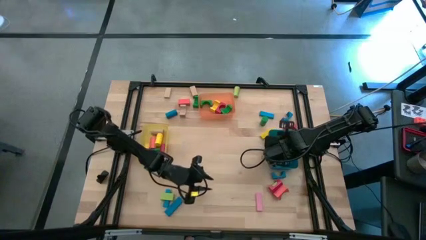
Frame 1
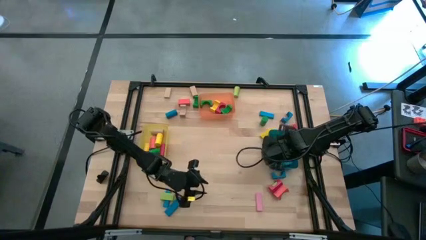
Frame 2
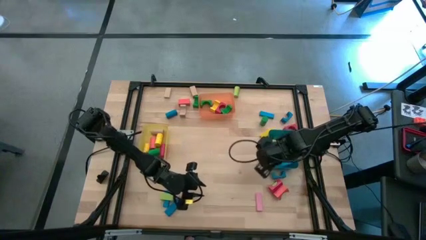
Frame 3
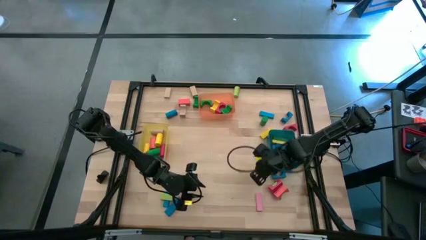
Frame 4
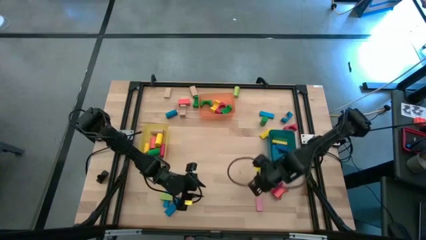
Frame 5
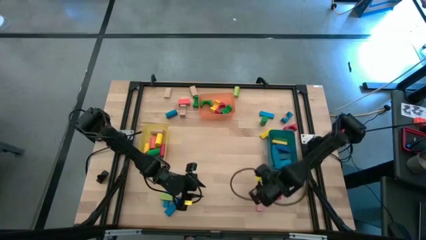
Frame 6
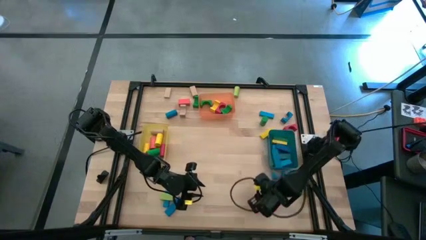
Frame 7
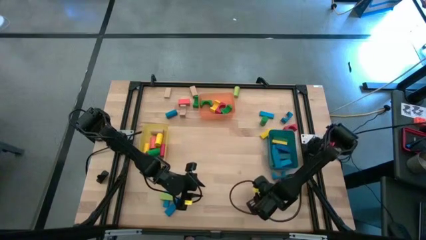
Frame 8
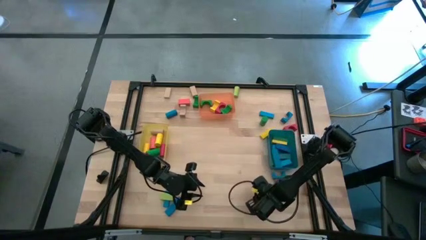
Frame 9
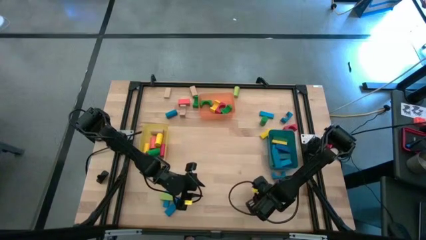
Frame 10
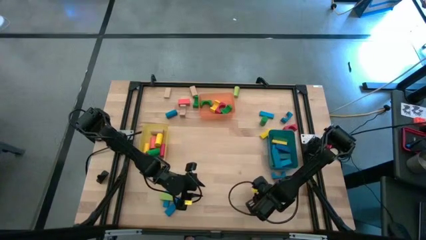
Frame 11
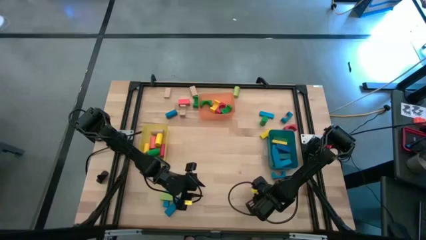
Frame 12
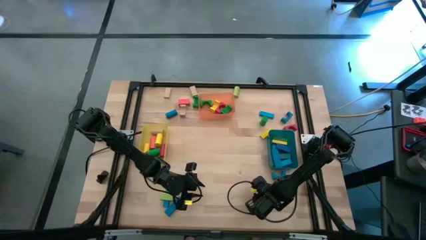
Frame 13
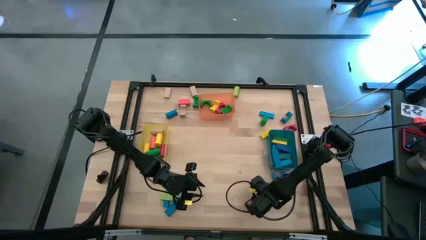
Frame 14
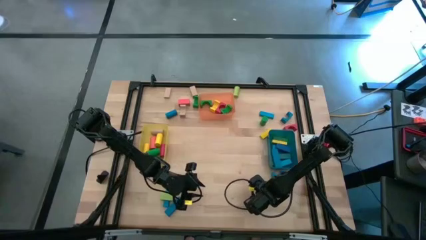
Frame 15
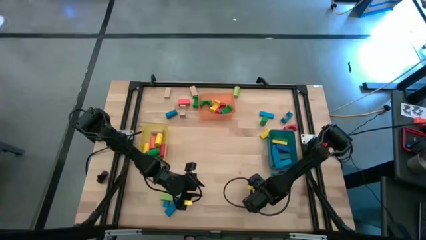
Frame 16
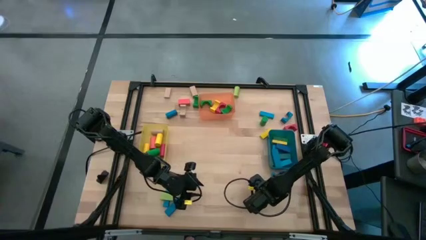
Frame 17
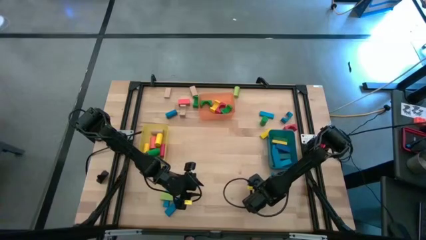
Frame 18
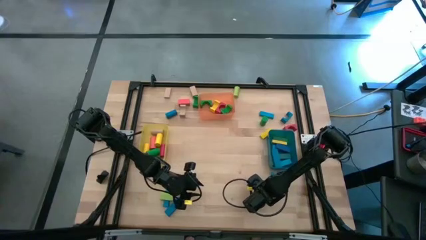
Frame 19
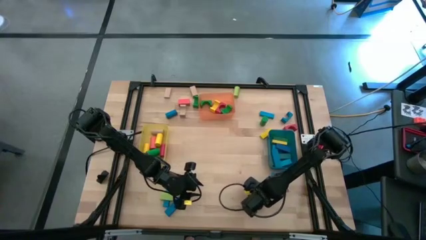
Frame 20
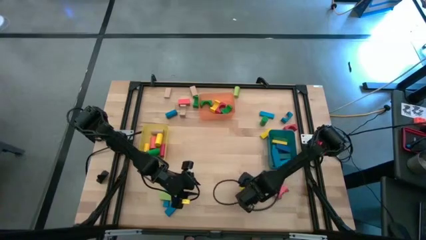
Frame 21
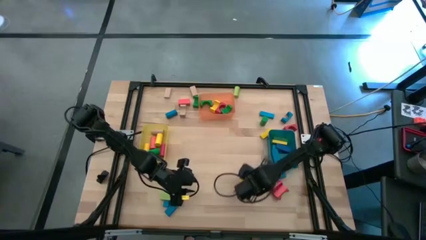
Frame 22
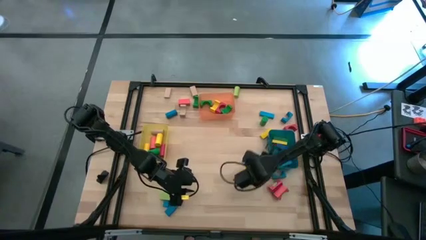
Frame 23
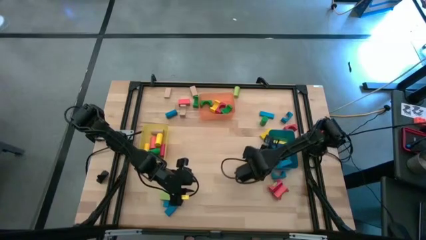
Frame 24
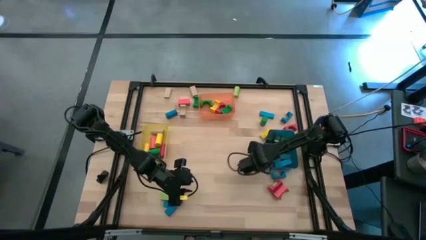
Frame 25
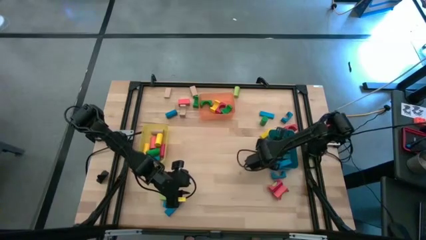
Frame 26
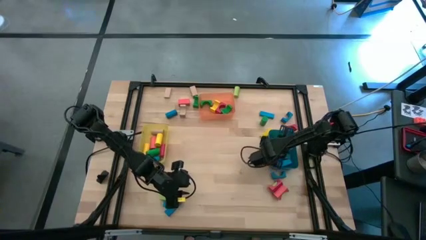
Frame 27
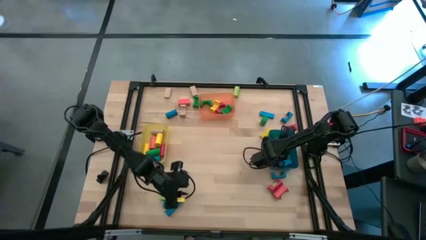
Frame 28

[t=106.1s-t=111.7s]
Task: Sort blocks by size
Put the pink rectangle block into the blue bin

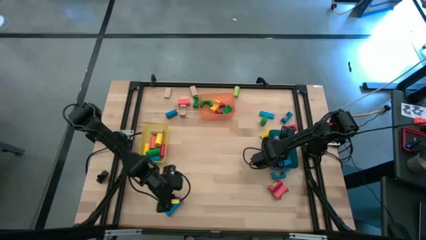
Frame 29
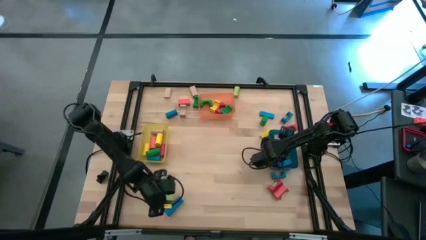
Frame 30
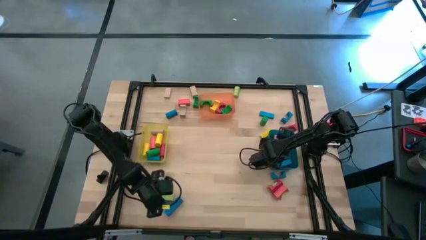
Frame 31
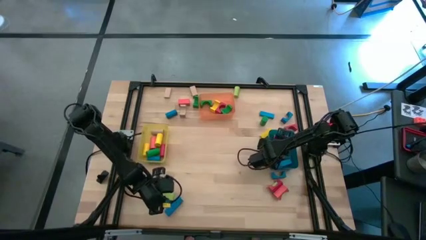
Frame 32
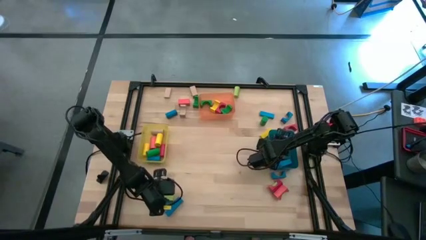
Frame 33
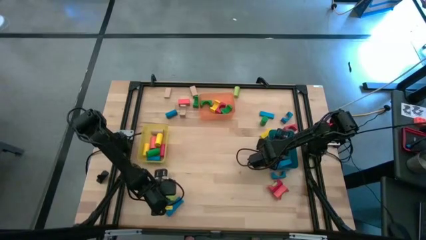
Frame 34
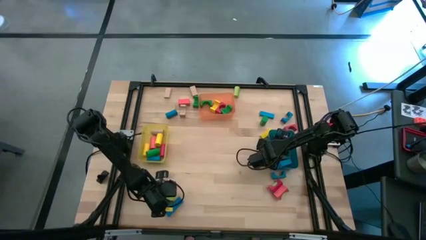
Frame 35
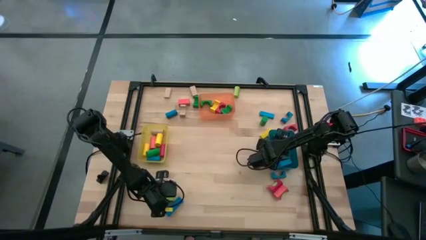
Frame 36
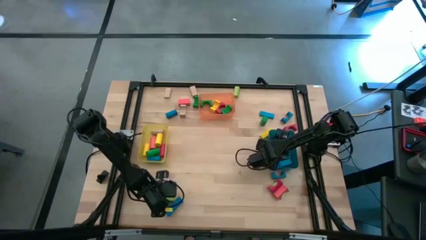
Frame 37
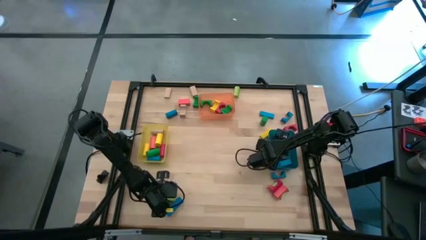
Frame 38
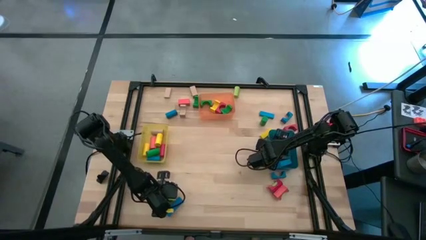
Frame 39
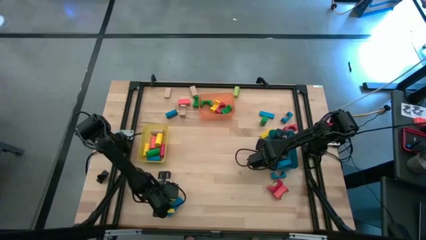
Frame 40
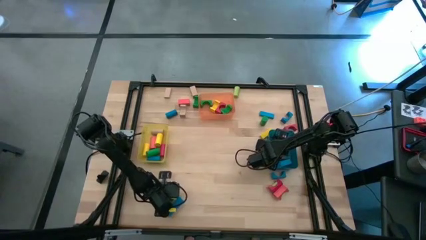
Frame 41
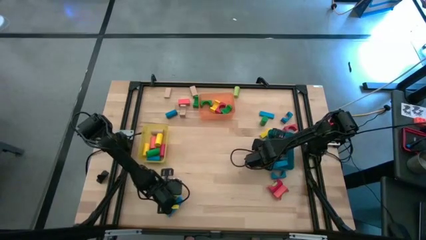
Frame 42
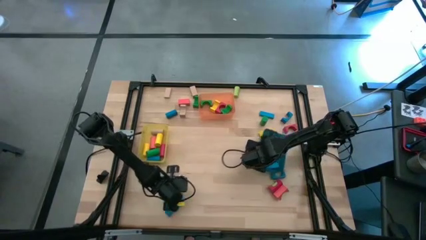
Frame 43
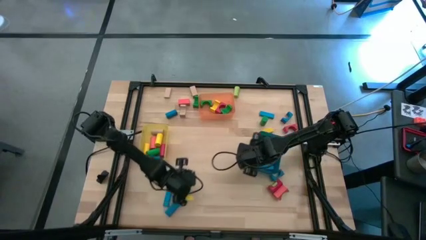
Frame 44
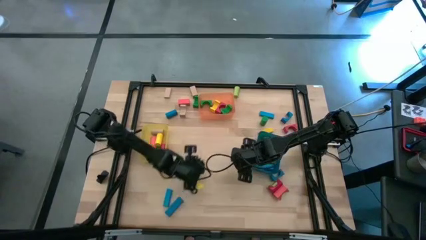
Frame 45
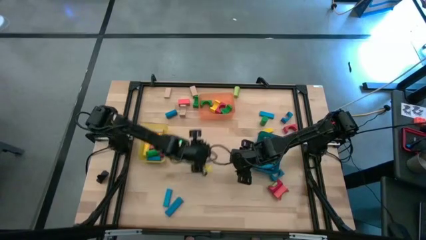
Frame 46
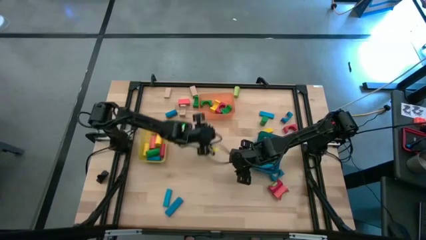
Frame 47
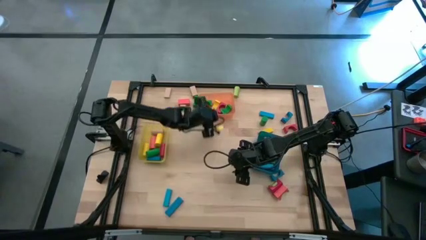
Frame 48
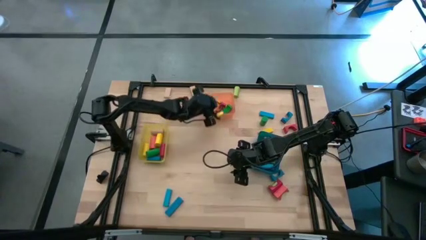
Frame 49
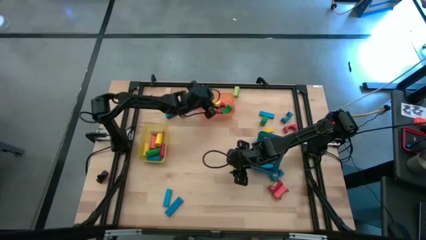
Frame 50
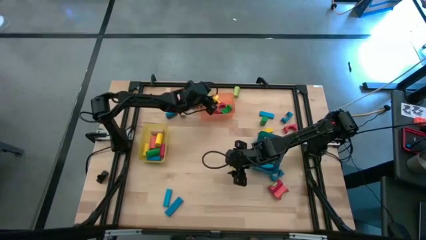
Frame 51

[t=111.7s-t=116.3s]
Put the light green rectangle block into the orange bin

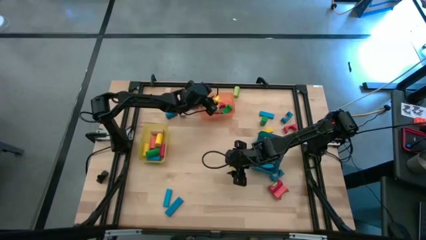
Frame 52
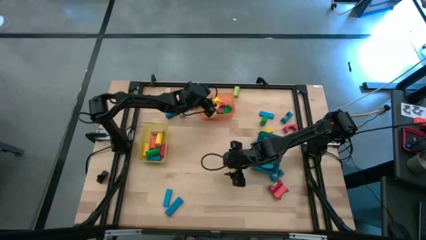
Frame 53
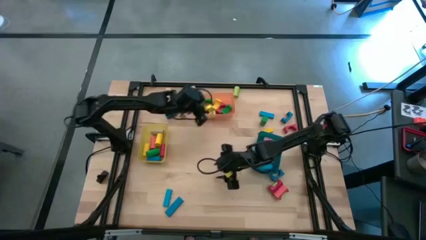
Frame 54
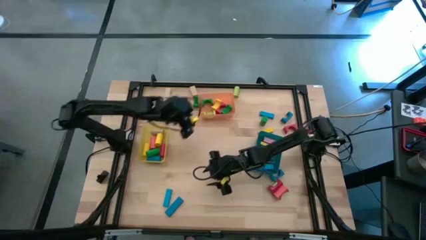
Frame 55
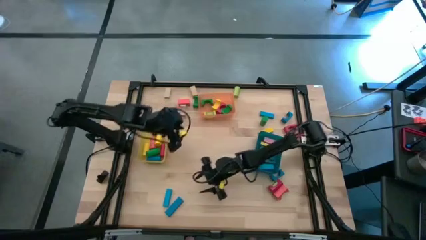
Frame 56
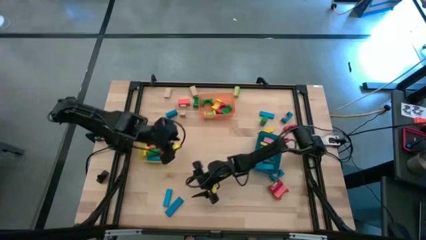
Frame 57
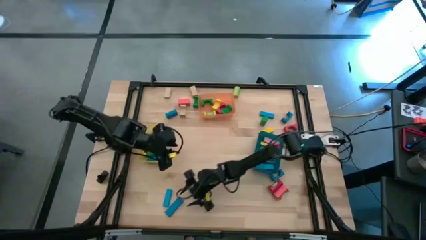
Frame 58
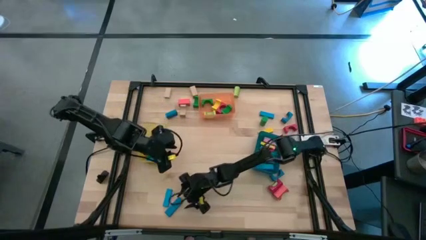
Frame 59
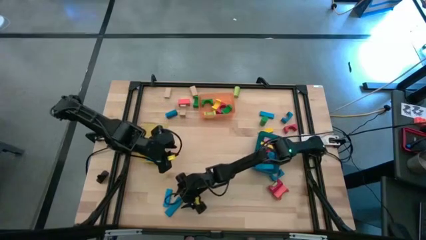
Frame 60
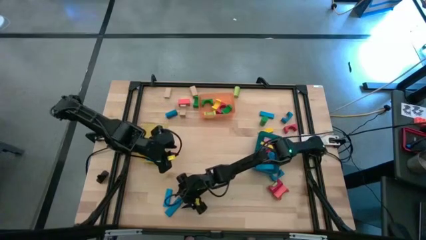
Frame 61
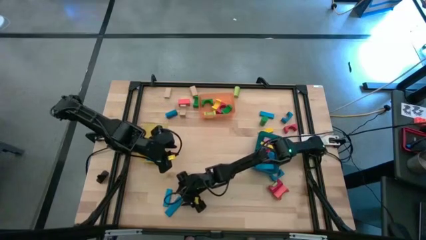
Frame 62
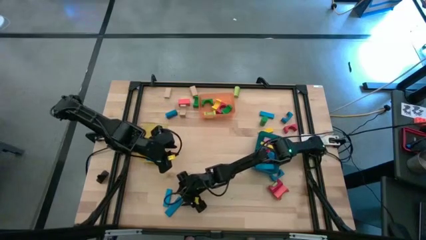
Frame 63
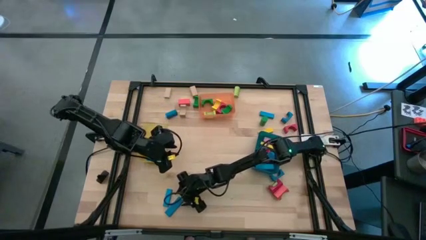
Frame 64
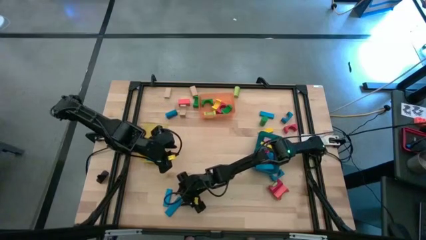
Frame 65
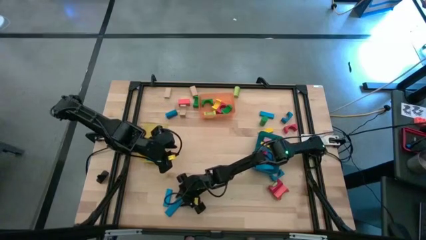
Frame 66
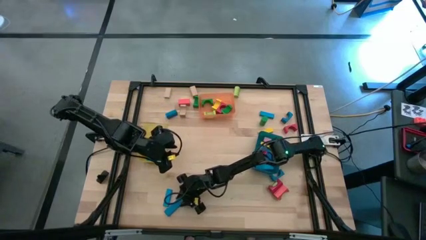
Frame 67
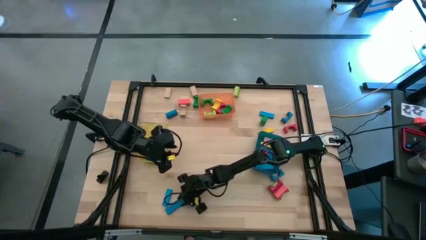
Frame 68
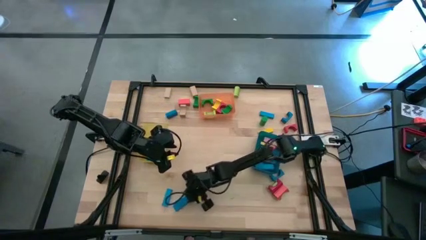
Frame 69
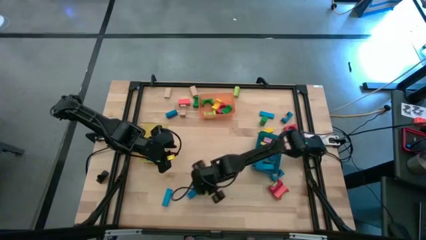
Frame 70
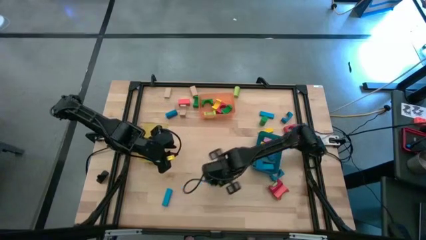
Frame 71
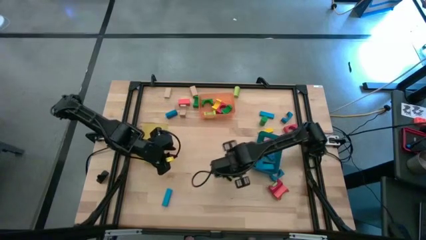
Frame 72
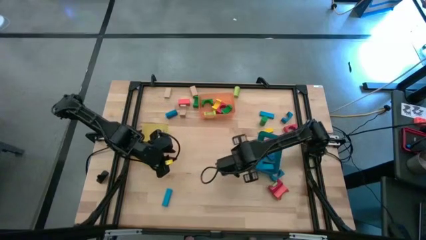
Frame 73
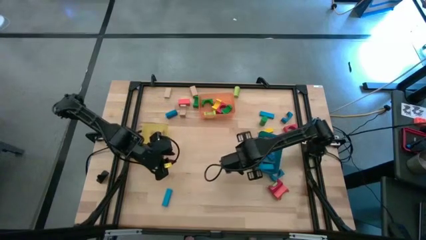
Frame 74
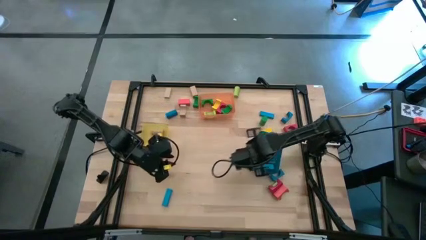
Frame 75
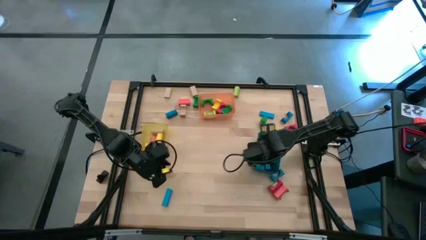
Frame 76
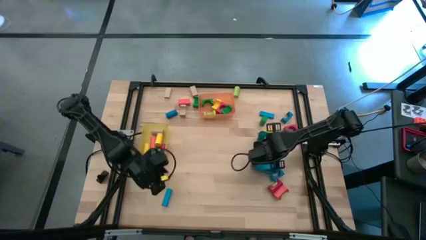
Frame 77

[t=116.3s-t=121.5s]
Put the blue rectangle block into the blue bin

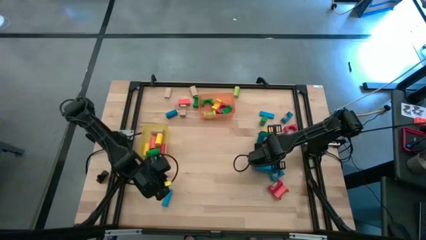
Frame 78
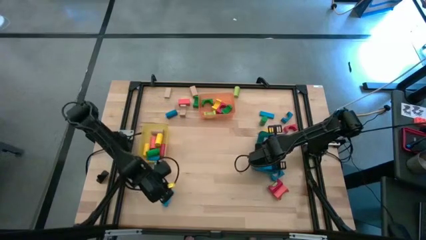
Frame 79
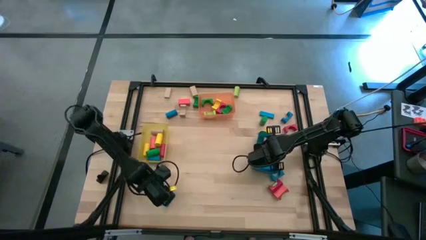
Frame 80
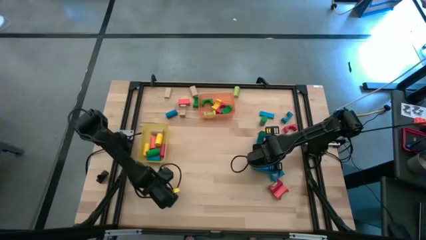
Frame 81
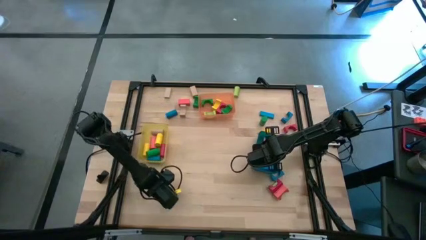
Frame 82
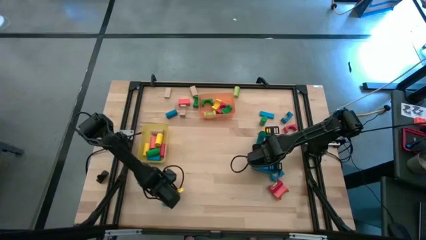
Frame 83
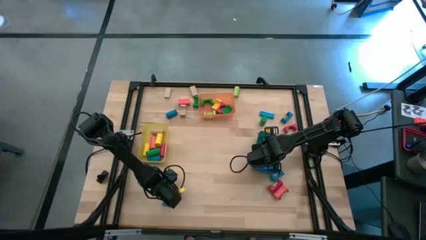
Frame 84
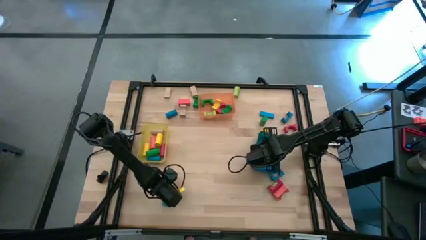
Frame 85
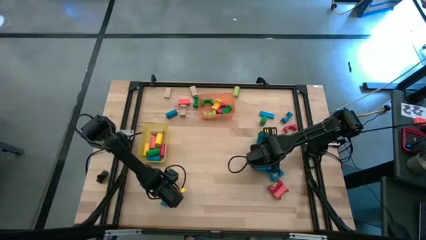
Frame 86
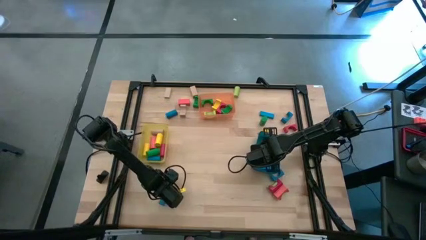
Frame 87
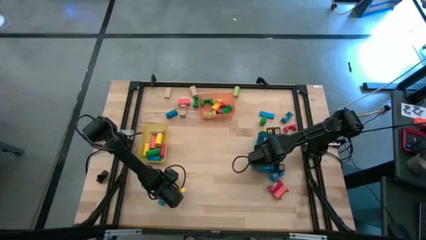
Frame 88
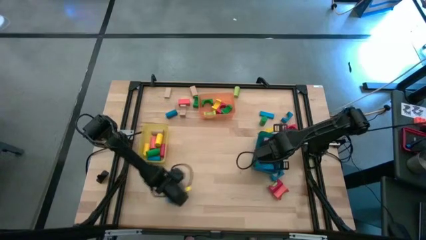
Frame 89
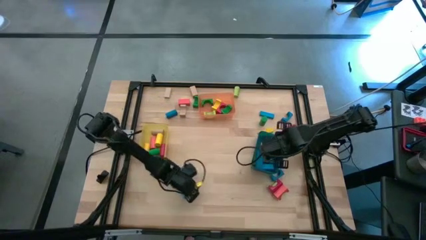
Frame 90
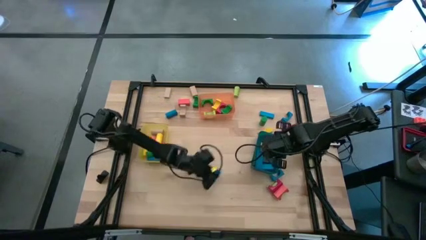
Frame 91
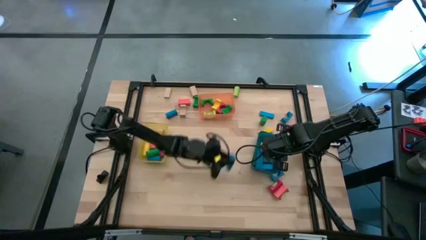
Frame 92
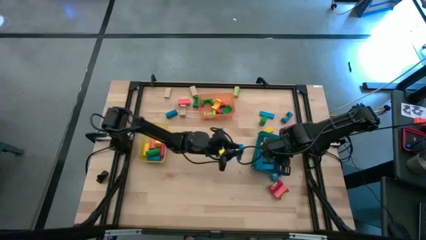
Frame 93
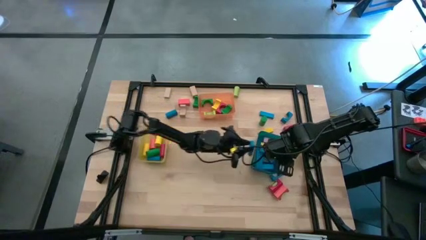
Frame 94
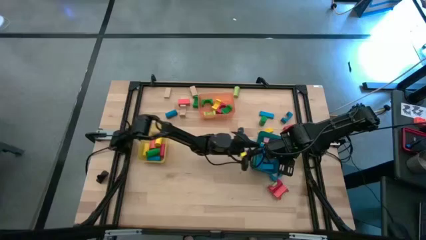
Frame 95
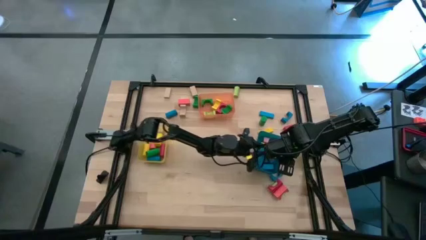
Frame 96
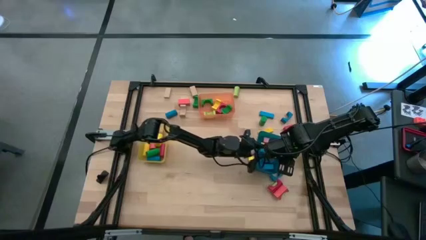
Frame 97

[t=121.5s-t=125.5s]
Put the blue rectangle block into the blue bin
